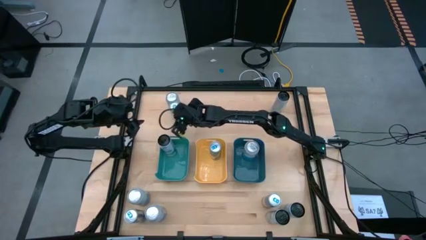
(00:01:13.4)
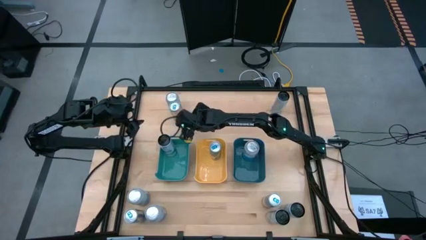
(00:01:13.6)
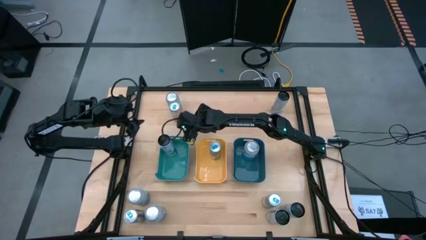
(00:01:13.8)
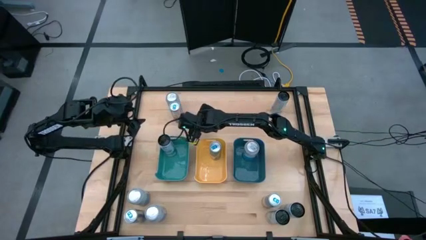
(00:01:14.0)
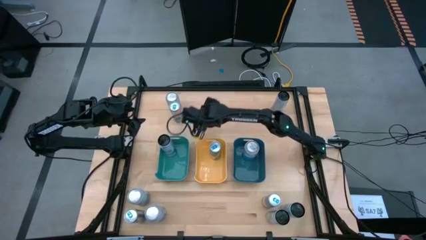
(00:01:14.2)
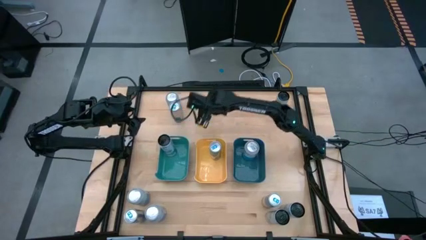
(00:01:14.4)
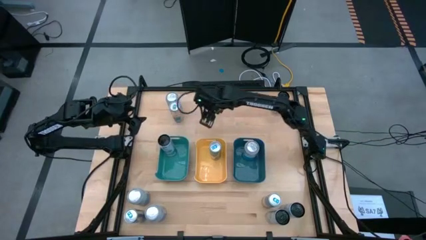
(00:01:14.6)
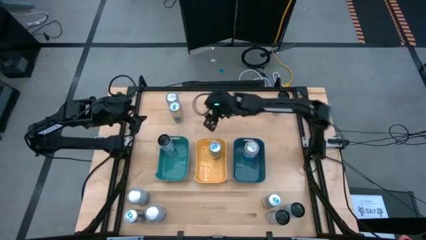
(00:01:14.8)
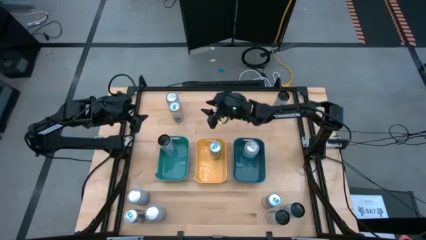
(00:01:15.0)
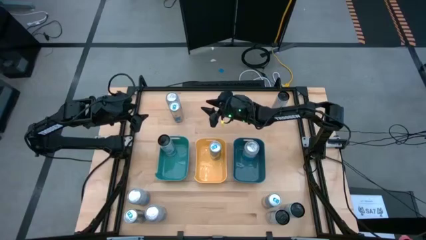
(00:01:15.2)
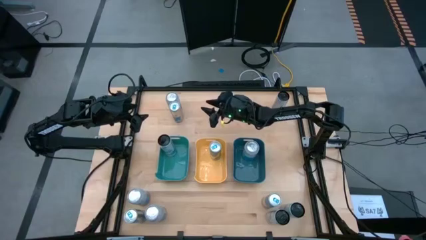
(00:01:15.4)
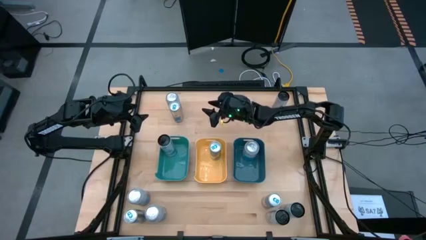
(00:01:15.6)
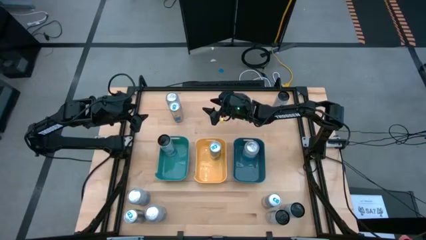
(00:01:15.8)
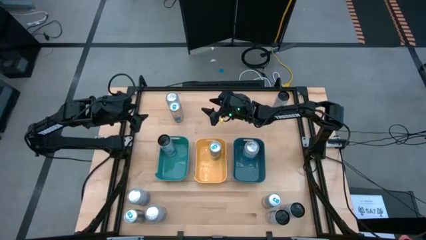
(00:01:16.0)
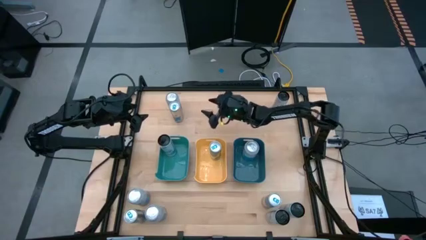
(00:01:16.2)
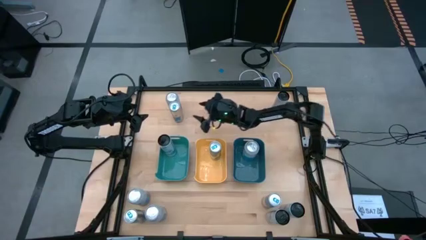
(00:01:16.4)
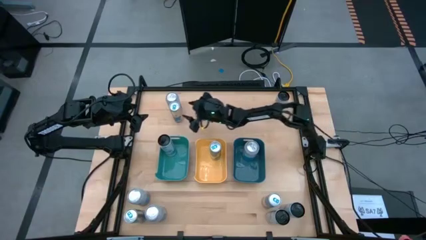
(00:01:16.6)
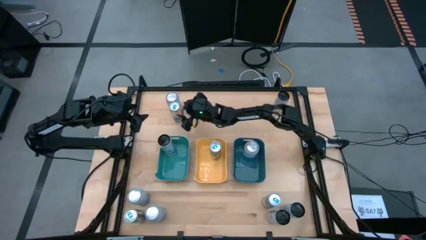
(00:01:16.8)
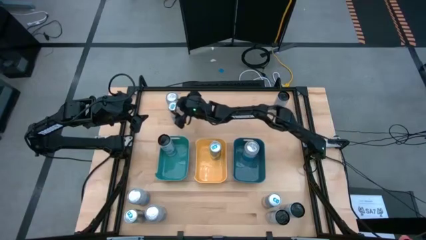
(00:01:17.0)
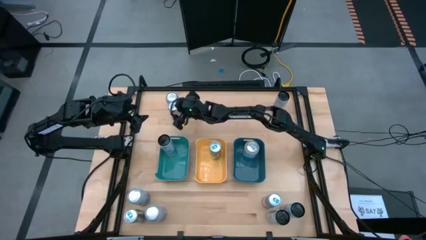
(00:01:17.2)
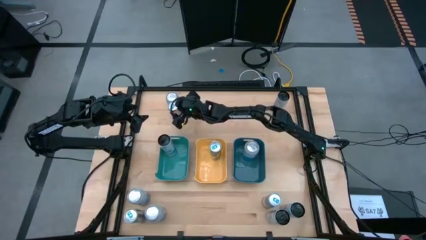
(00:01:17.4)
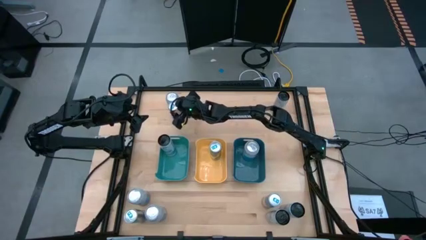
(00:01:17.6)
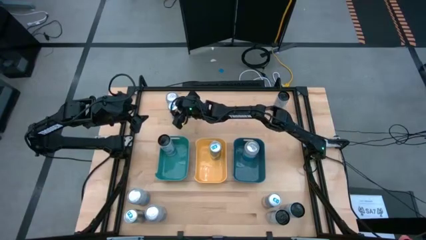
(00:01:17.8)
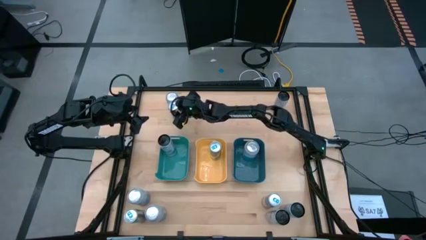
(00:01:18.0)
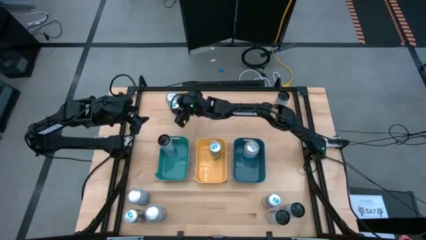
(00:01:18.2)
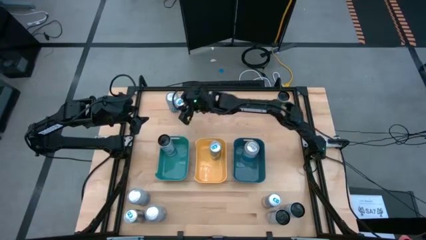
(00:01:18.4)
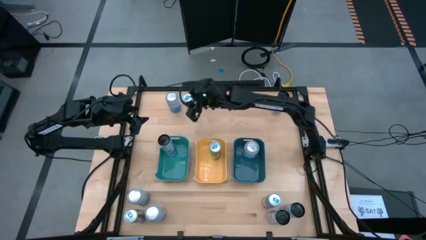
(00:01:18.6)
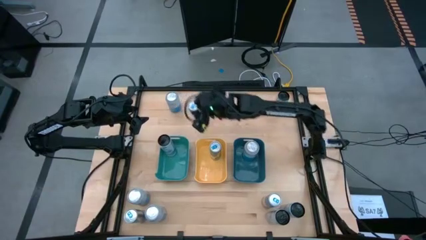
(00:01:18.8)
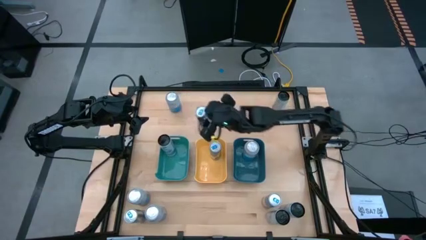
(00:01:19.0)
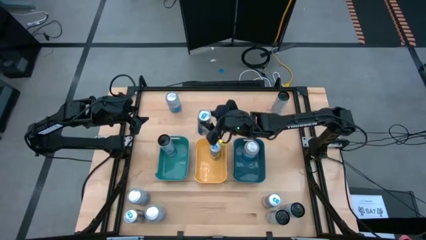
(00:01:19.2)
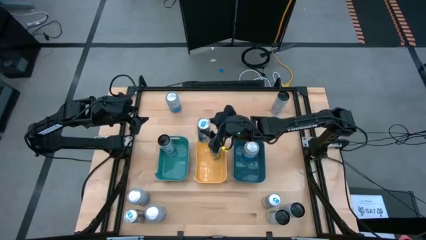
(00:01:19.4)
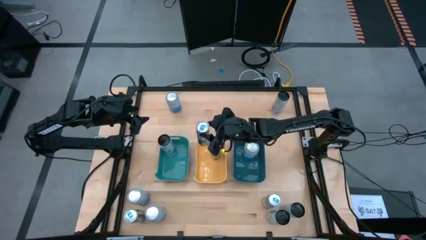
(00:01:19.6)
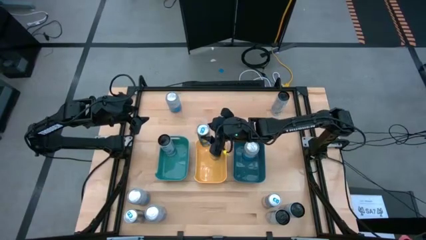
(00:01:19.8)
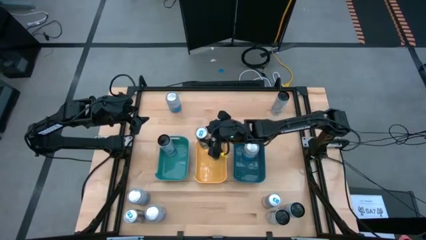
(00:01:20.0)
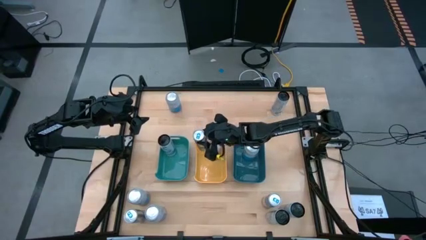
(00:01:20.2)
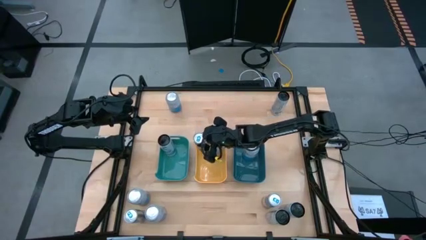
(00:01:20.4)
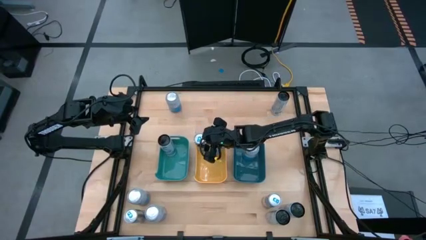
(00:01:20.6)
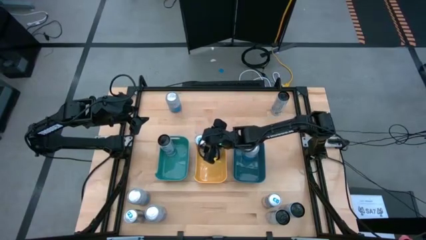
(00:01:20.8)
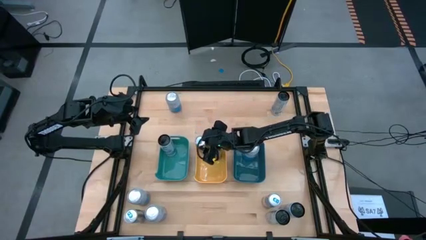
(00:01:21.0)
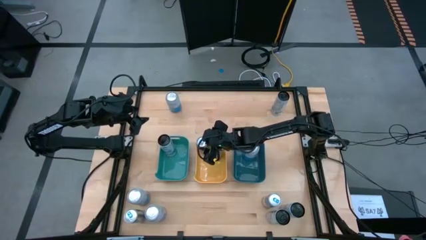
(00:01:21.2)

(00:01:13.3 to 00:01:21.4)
Task: Sort soda cans
Put the top left blue can into the yellow bin

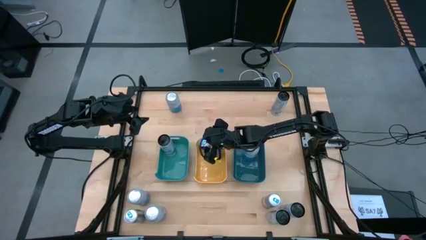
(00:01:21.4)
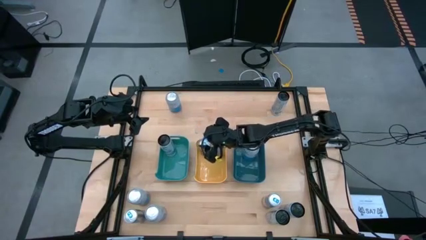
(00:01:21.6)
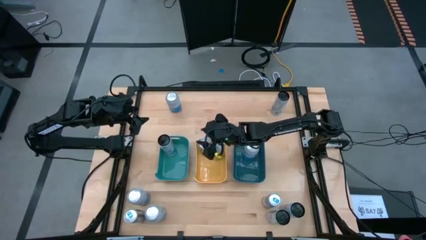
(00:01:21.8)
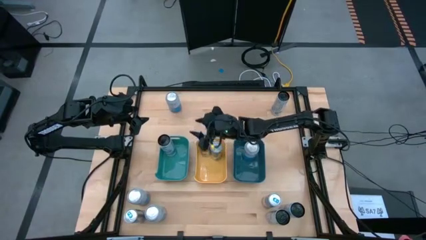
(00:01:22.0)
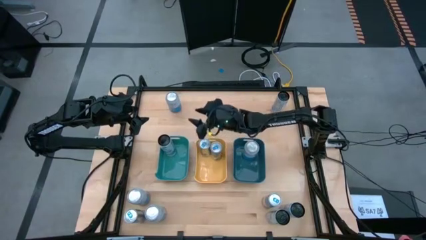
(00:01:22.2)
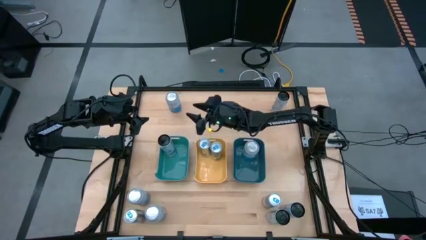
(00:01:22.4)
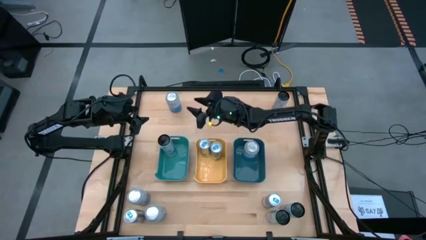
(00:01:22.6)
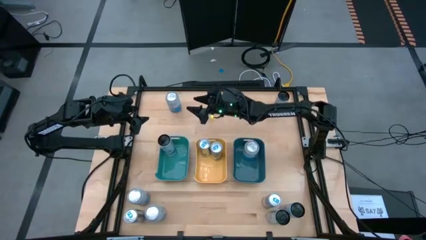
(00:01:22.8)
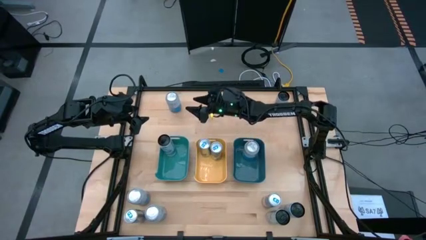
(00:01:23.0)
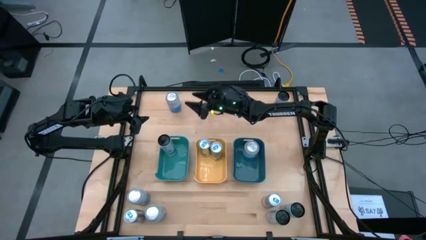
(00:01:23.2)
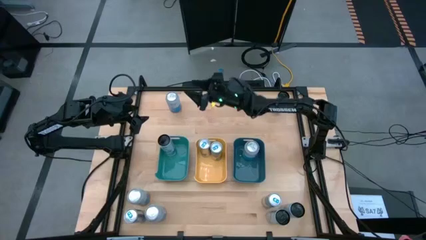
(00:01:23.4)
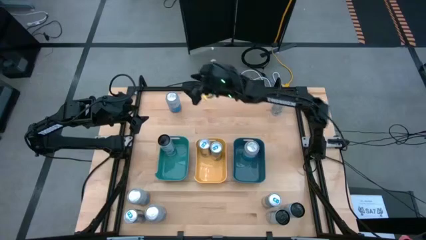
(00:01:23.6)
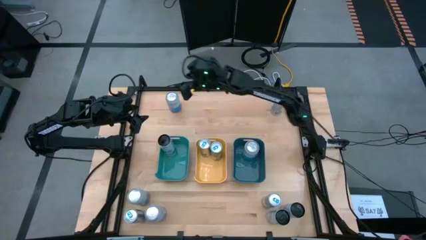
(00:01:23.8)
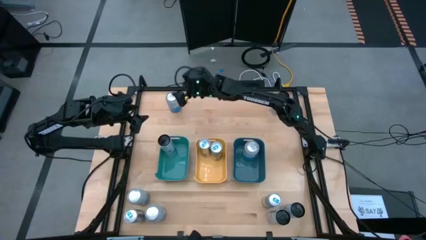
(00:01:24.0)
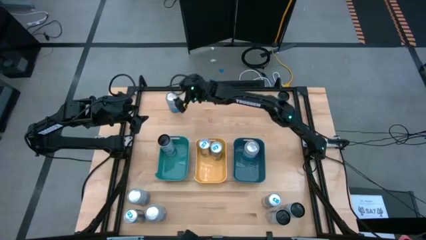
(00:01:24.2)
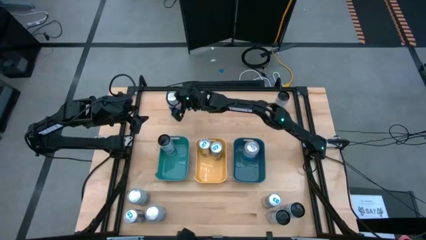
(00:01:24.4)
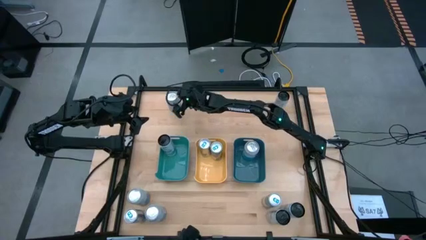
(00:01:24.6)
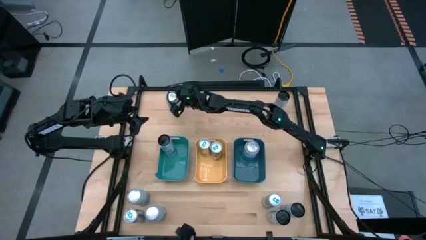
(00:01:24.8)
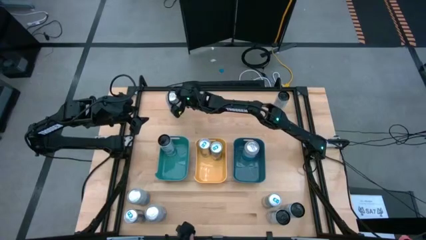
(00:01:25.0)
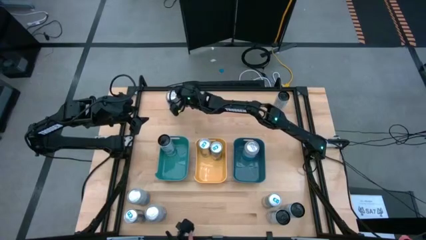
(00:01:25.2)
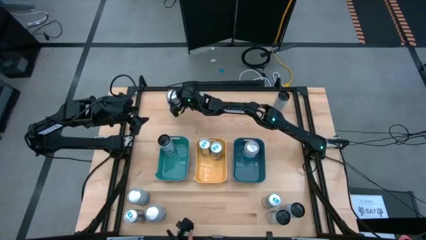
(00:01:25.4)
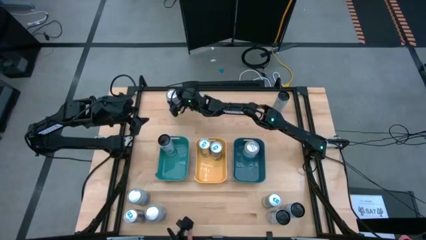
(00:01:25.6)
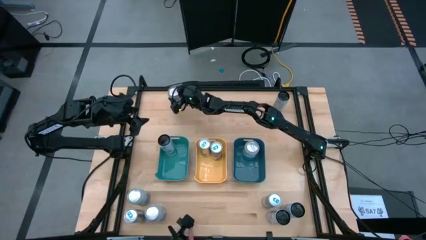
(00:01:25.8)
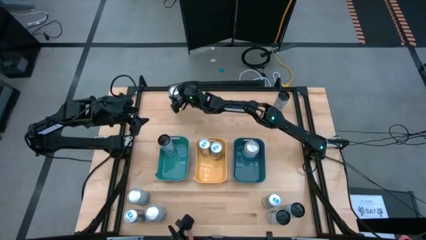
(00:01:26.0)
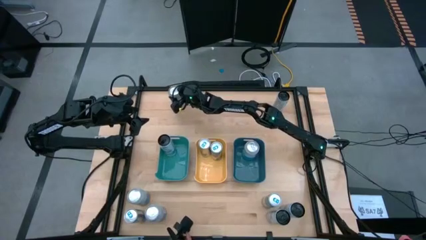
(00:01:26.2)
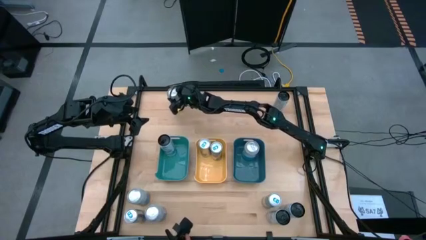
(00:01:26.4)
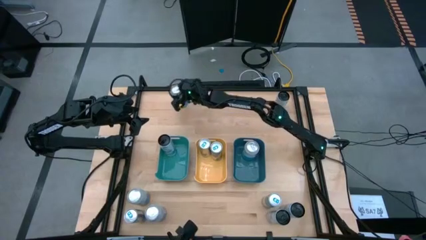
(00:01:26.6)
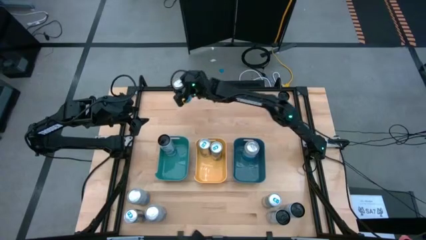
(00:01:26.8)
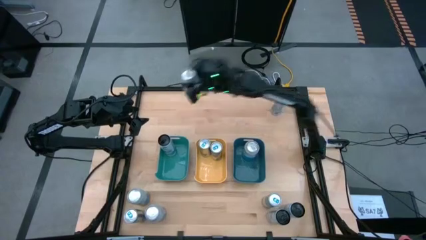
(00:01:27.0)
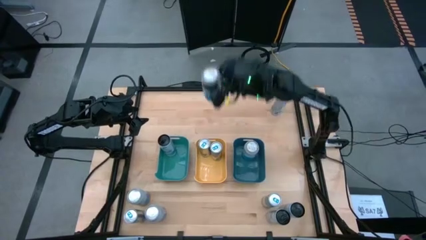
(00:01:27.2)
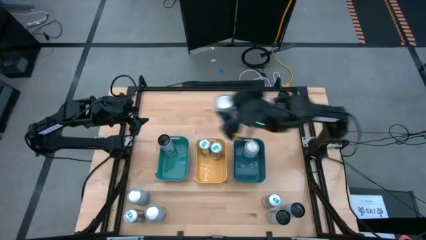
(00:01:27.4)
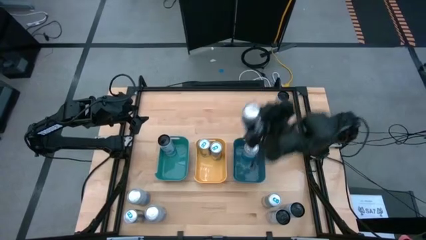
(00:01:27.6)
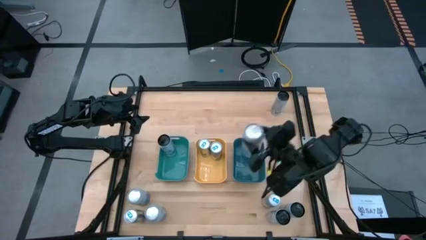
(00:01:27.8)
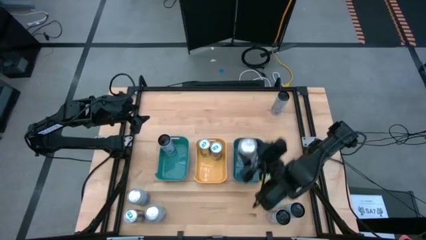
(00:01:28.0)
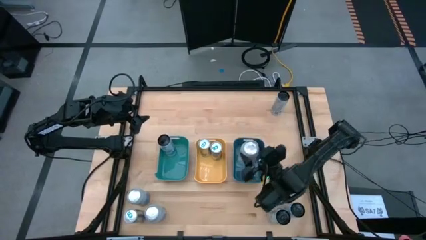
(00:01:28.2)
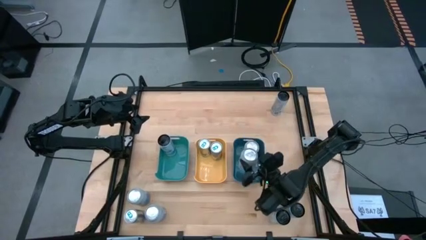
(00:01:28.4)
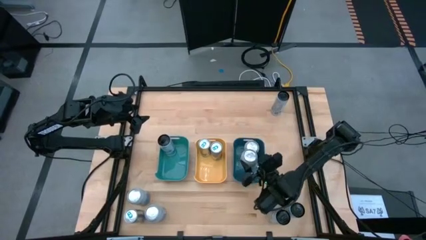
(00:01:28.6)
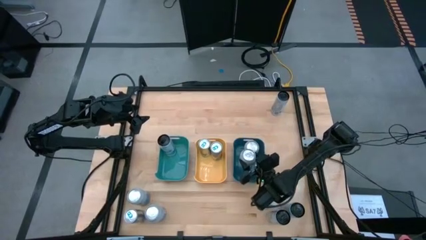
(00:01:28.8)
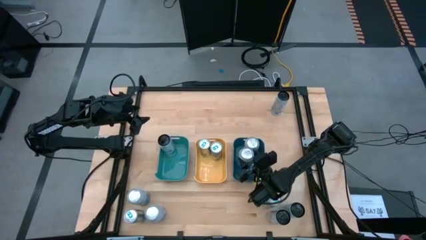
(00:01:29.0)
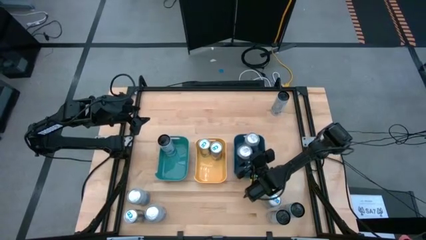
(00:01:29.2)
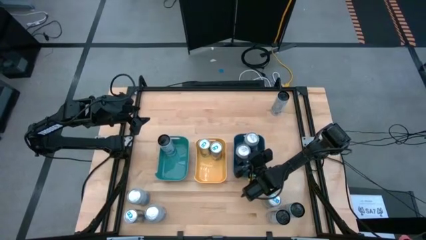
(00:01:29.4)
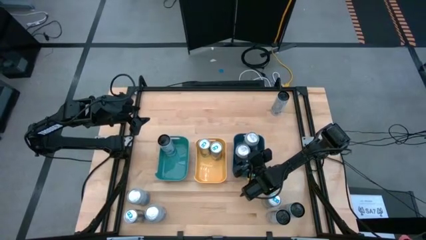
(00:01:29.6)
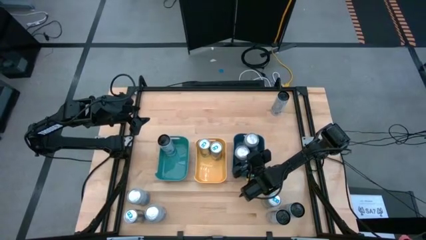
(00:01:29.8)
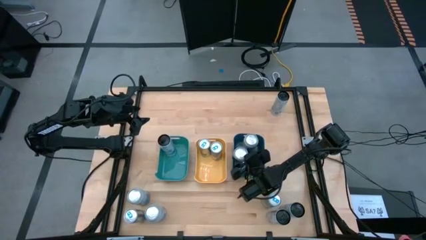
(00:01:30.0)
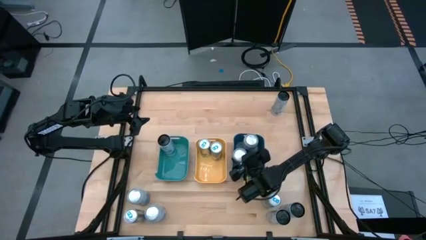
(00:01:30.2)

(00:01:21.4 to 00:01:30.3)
Put the top silver can into the dark green bin
